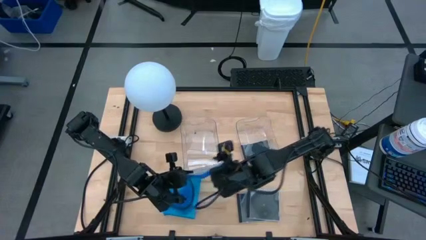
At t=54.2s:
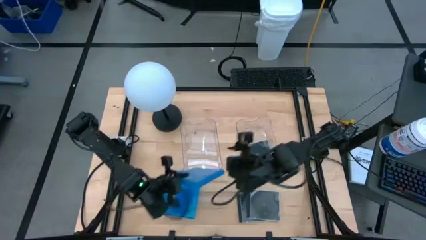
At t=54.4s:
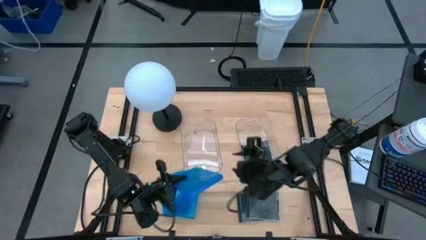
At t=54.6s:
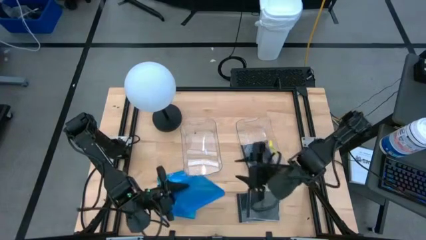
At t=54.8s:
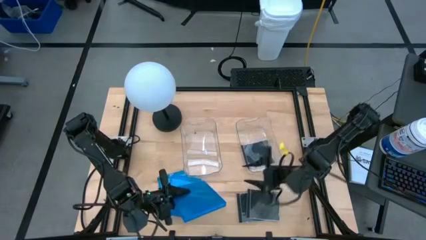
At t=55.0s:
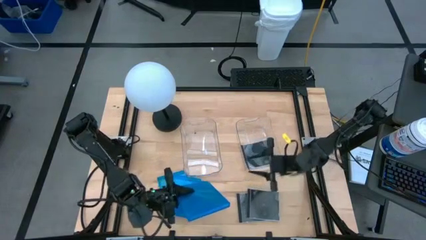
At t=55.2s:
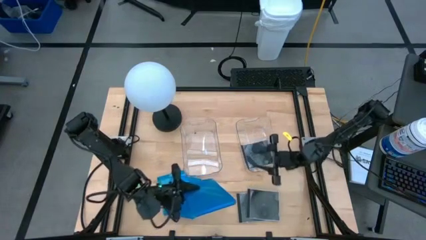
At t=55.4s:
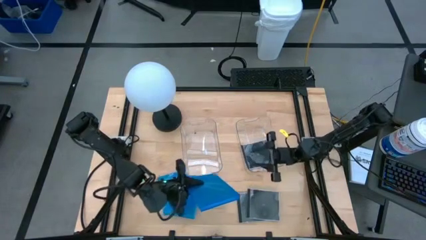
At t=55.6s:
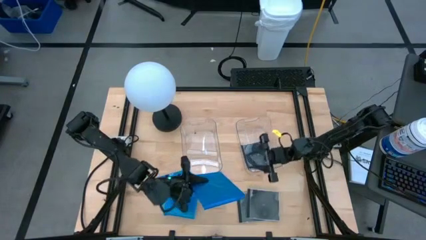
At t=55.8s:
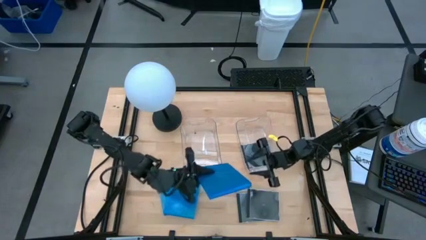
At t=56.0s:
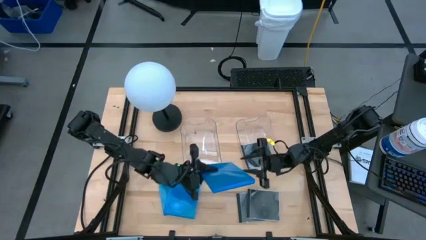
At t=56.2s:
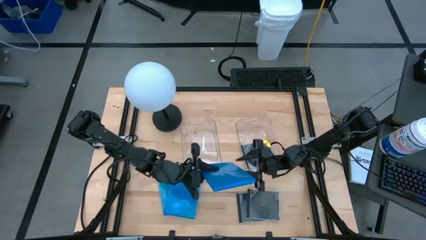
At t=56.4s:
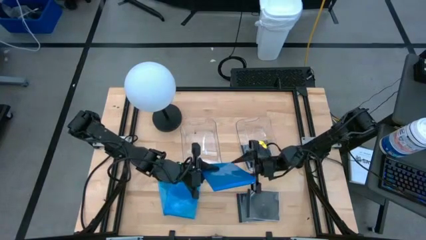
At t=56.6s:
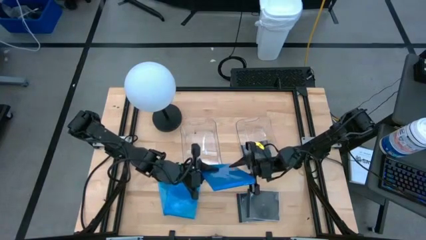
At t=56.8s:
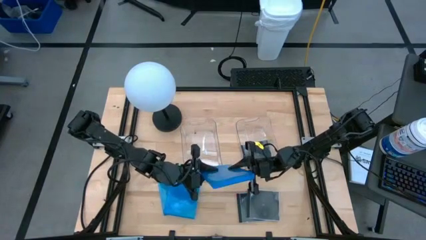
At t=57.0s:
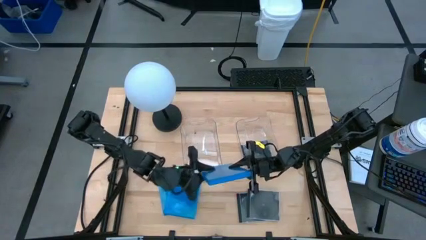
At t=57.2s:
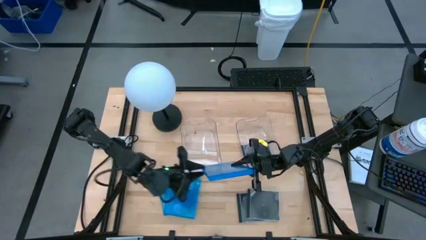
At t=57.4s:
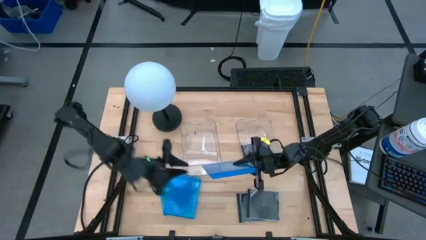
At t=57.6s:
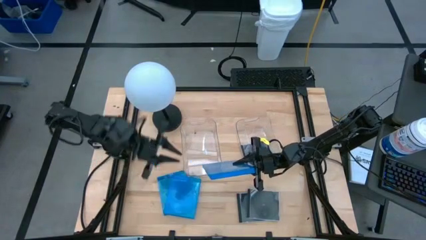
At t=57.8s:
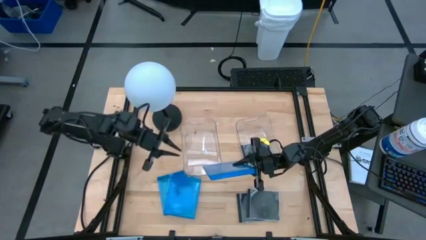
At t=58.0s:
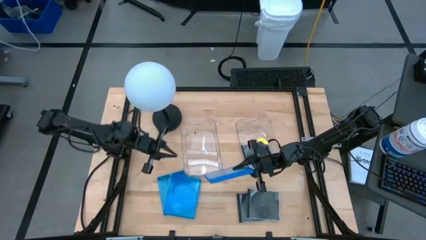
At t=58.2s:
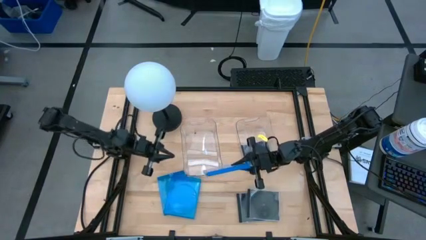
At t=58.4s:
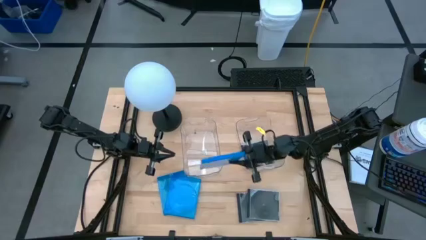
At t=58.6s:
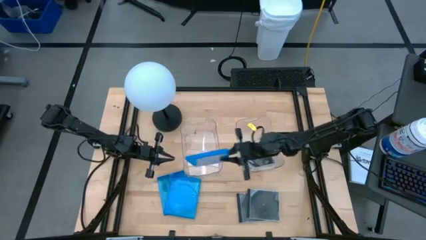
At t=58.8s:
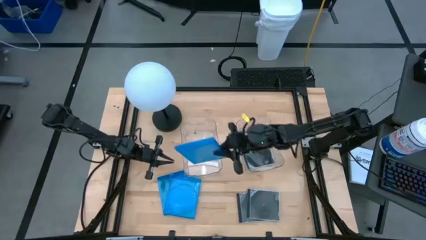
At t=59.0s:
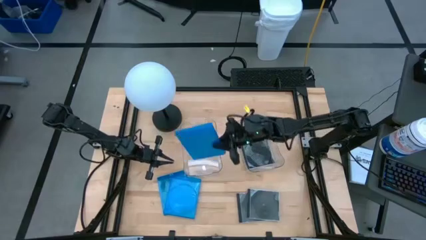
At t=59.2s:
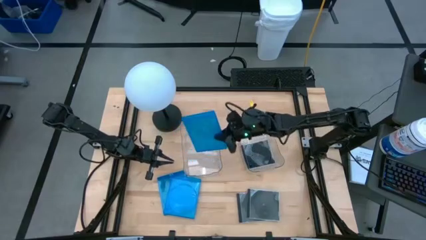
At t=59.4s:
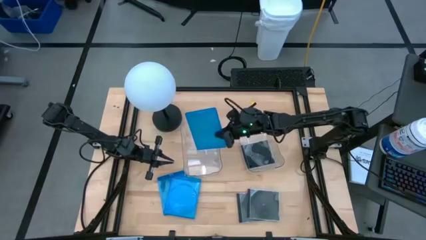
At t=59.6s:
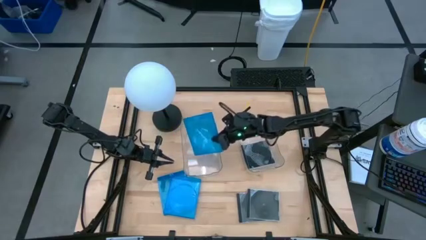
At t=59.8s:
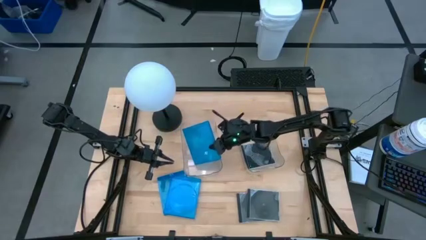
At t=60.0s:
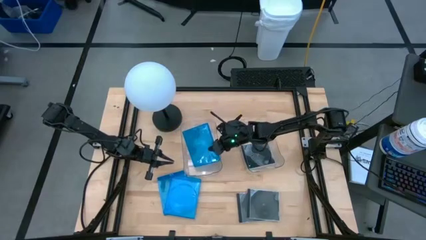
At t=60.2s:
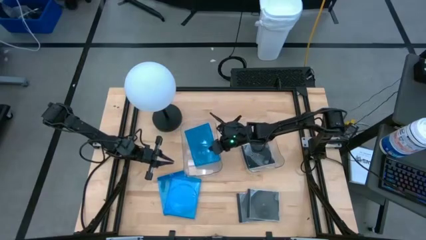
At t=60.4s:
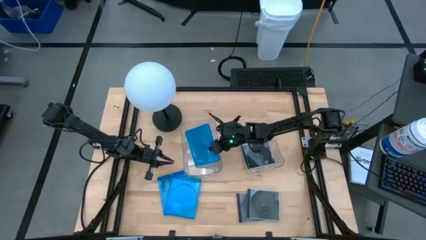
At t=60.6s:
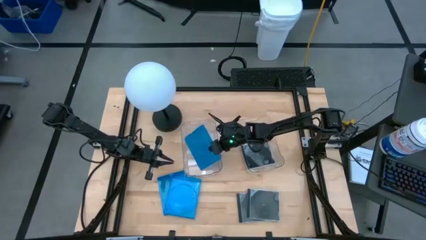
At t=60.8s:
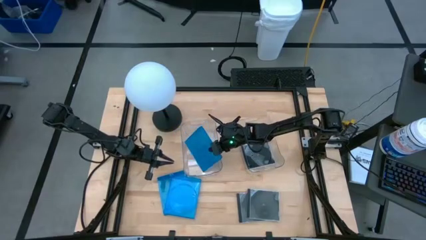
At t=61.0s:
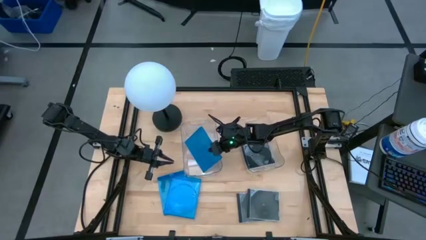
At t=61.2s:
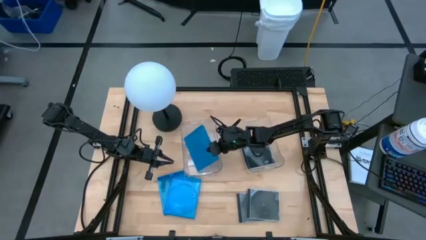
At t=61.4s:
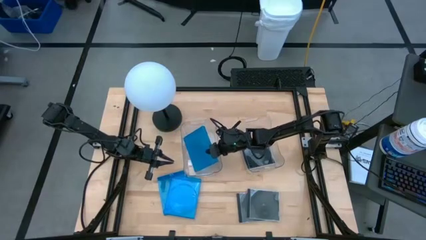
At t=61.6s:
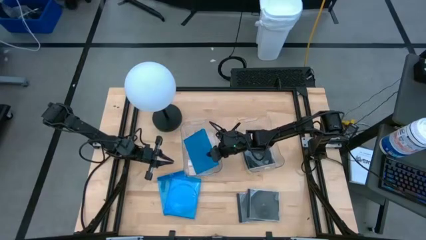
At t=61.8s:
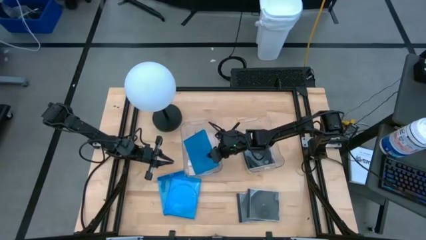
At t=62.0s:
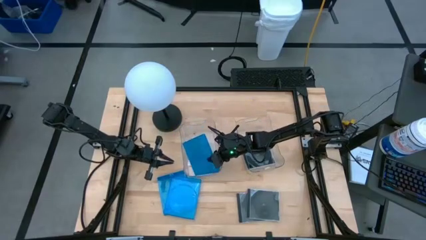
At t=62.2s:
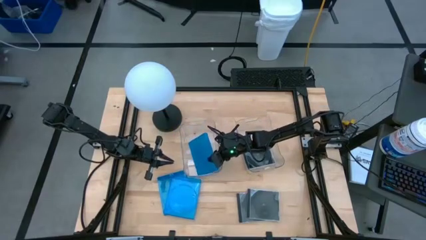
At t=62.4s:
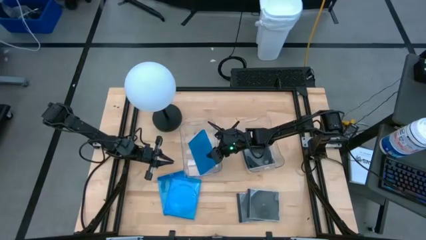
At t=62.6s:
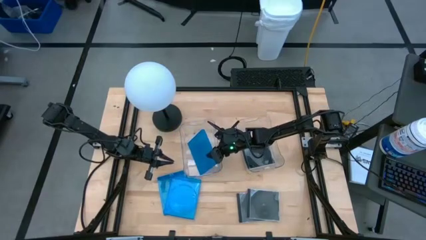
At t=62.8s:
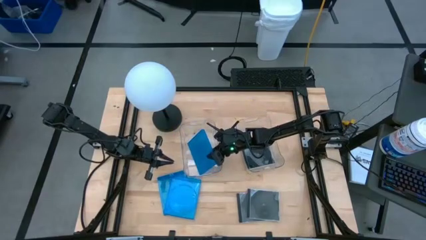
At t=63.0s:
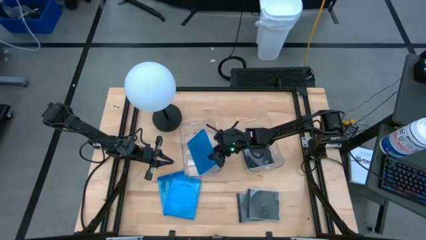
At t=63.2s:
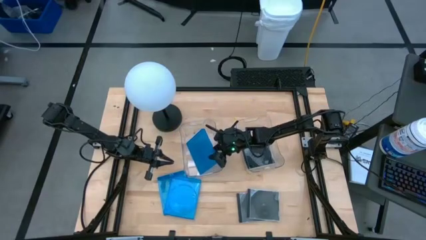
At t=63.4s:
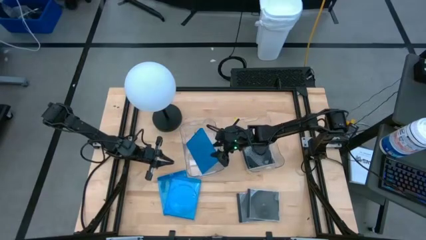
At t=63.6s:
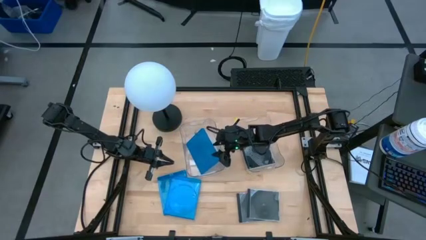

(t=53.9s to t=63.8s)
Task: Pick & place jewel cases by type
Put the blue CD case into the left transparent bin

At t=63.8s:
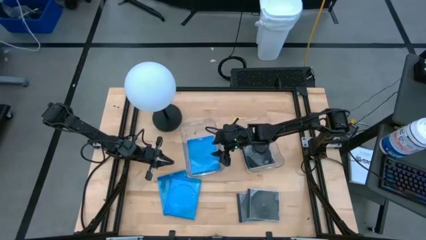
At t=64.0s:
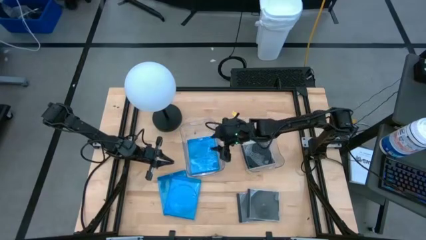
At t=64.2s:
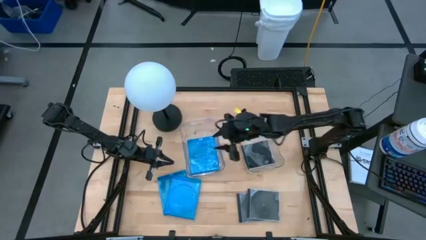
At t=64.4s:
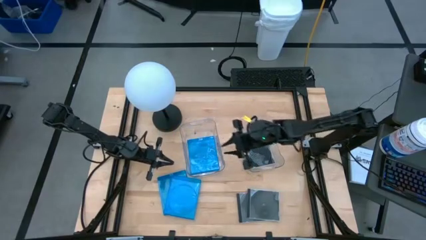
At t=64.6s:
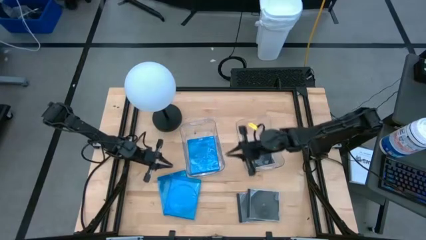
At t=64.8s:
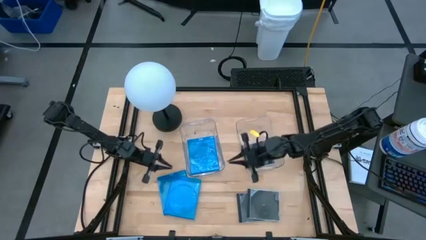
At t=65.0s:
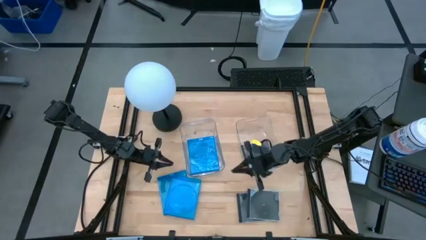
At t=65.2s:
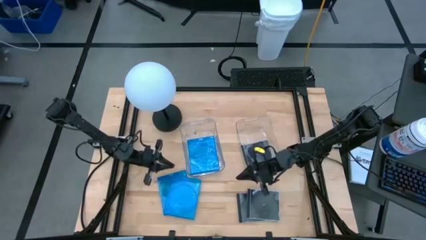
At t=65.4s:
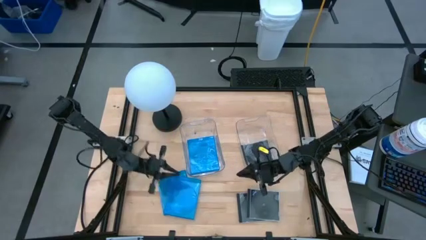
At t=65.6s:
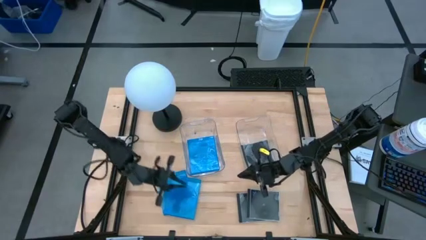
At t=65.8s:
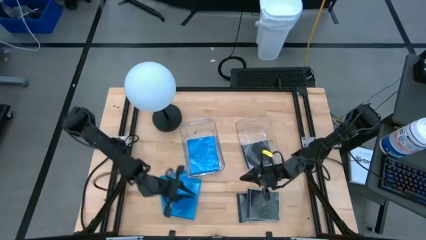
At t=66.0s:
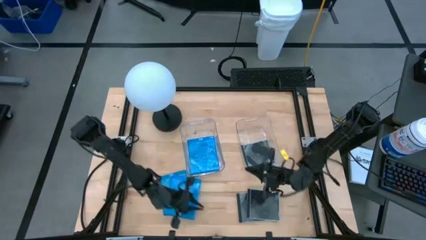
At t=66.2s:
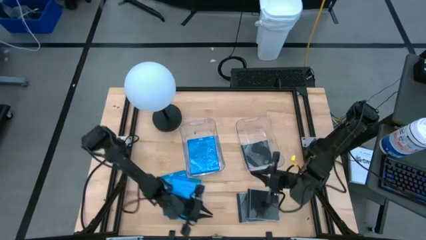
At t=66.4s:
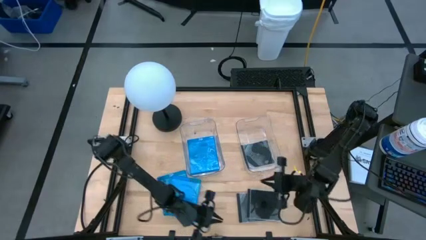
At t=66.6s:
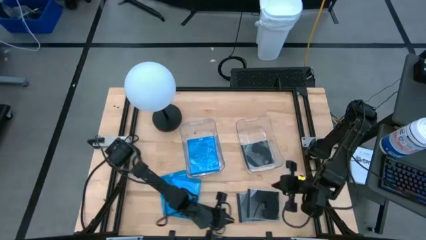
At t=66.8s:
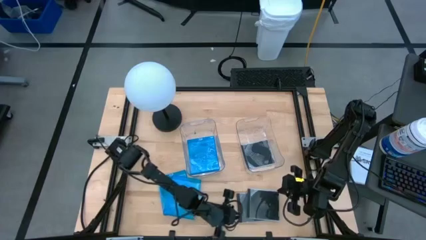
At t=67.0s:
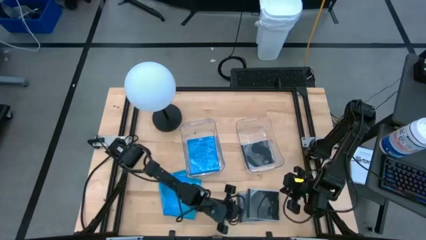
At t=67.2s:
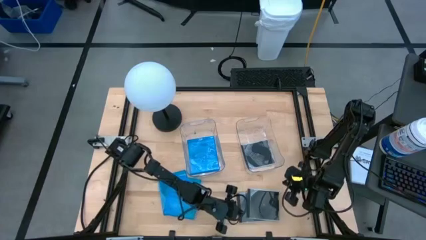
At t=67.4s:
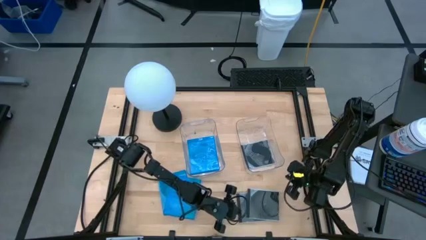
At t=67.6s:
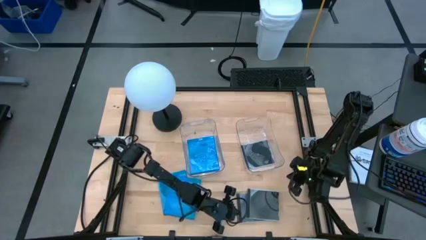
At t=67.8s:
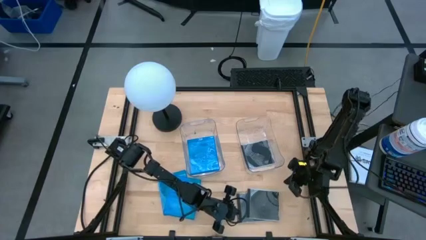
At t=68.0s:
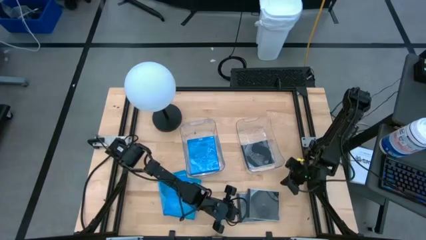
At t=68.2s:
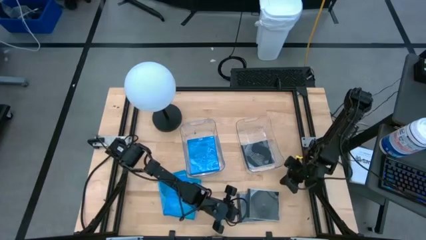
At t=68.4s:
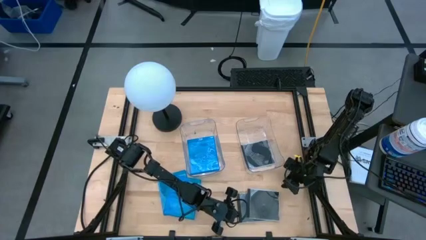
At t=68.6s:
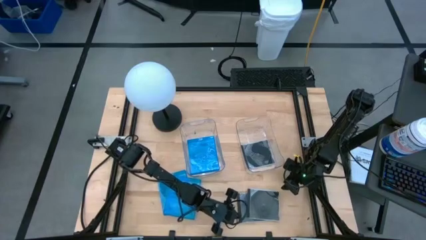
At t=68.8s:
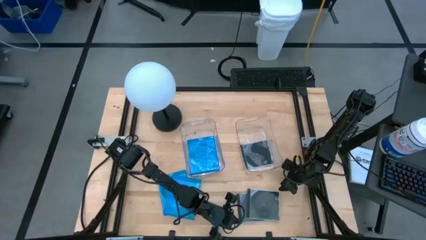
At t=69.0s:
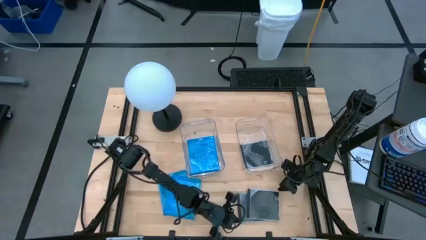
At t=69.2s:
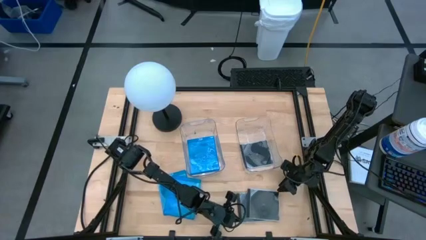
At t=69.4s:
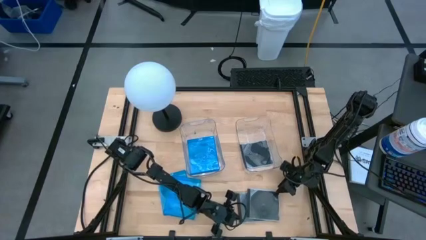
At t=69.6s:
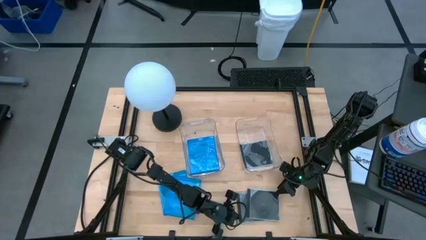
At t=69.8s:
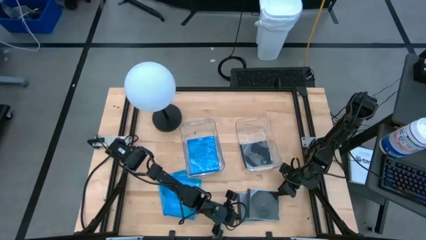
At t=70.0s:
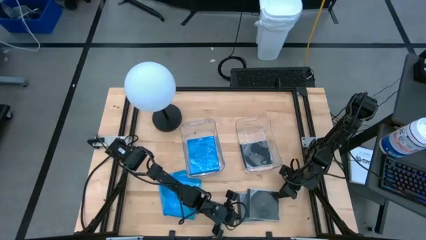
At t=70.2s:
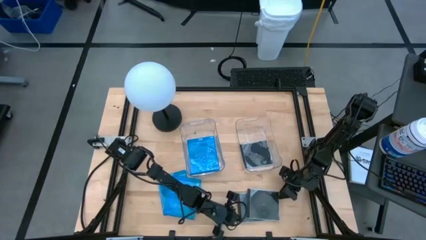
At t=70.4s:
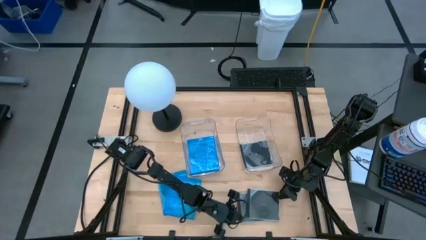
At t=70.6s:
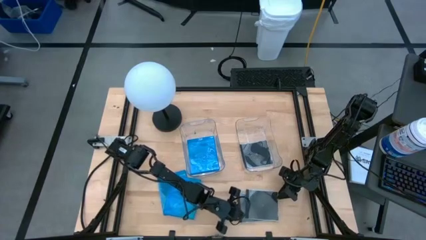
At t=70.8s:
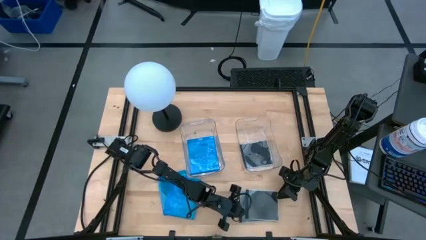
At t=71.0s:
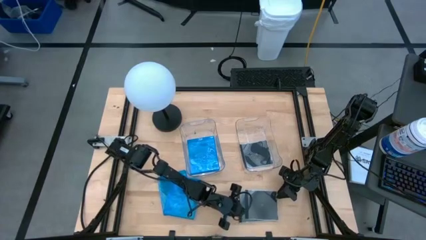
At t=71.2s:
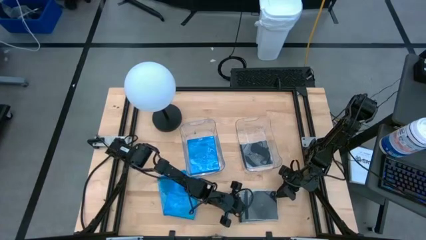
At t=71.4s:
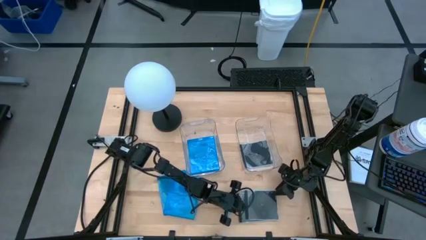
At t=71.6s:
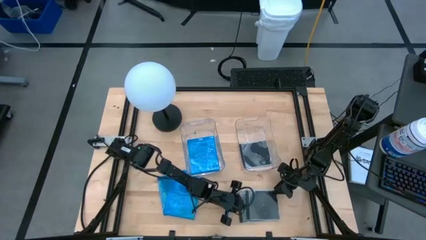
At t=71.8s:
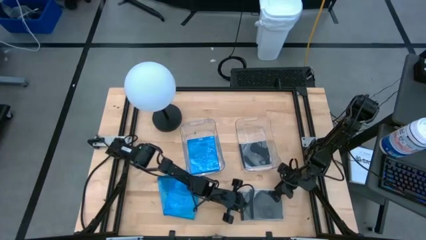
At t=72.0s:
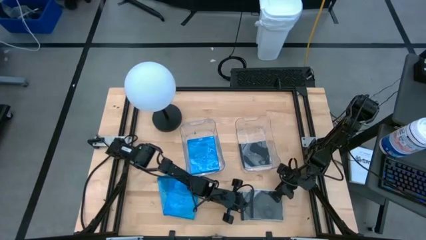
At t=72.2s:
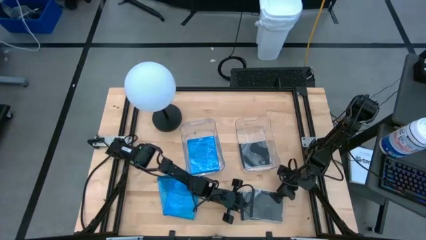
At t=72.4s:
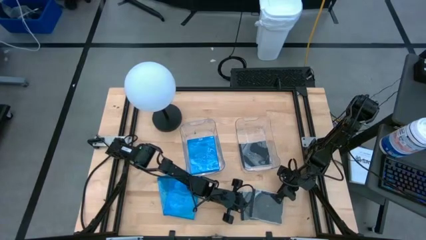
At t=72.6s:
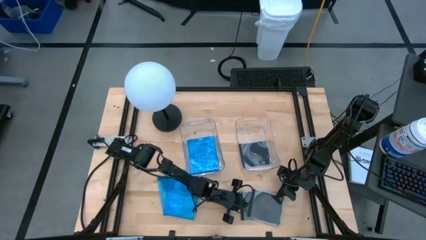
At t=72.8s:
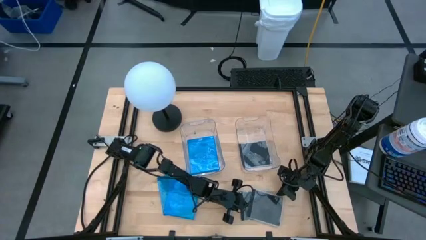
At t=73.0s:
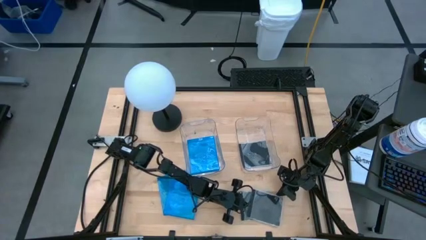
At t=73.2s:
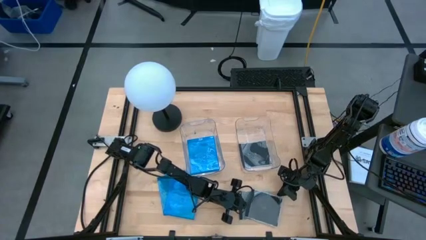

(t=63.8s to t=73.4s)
Put the black CD case into the right transparent bin
